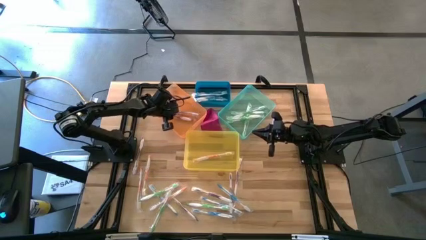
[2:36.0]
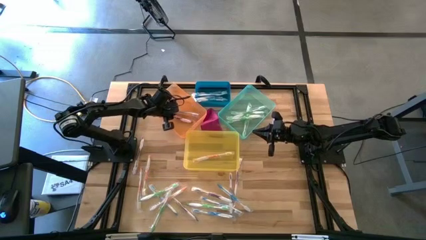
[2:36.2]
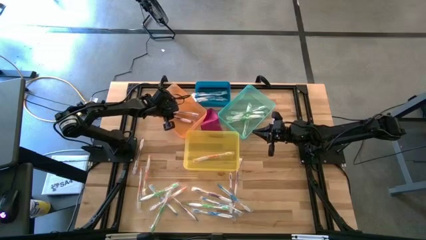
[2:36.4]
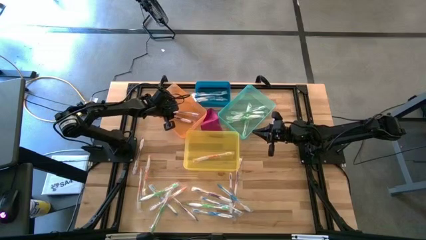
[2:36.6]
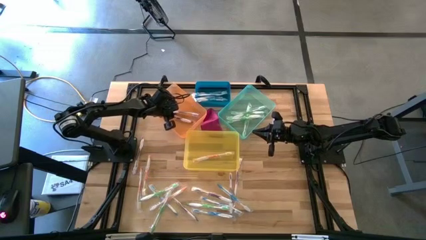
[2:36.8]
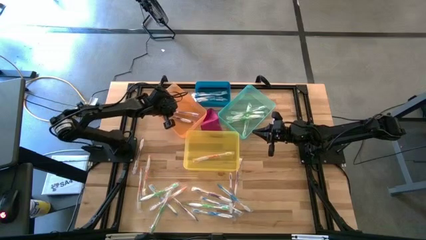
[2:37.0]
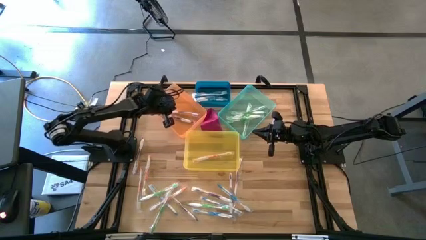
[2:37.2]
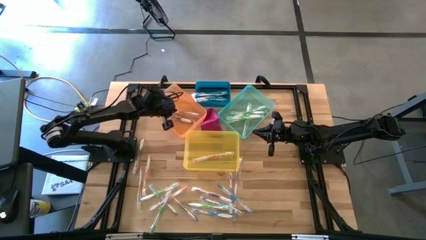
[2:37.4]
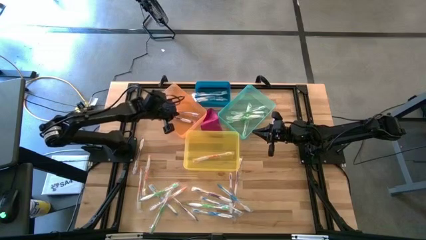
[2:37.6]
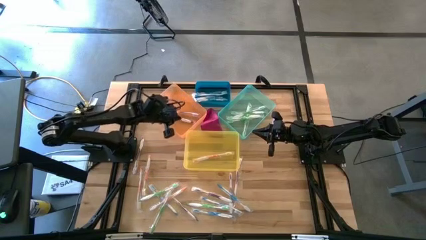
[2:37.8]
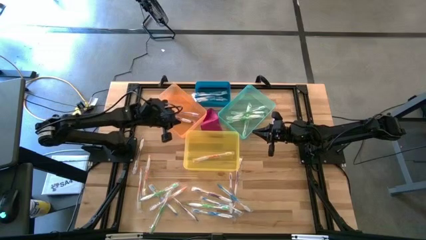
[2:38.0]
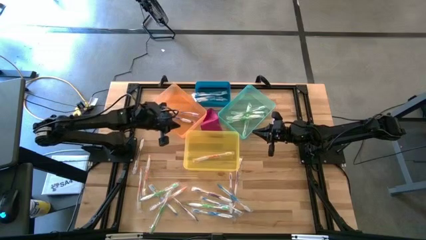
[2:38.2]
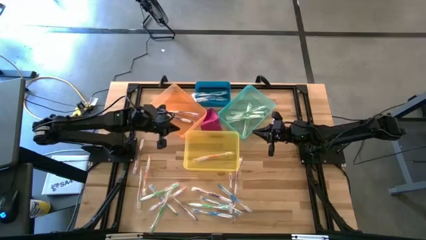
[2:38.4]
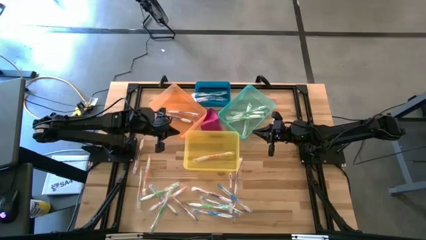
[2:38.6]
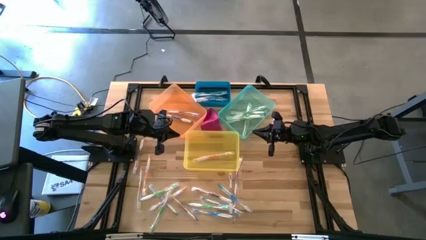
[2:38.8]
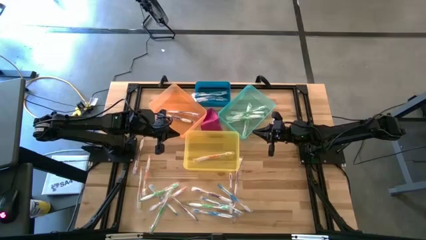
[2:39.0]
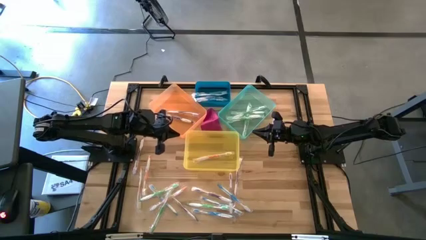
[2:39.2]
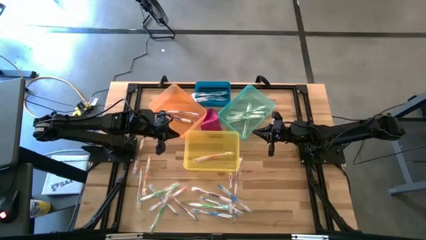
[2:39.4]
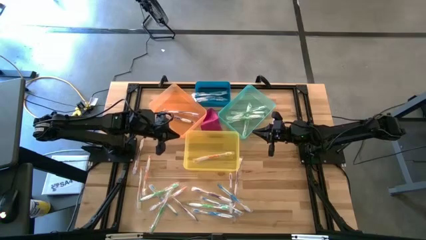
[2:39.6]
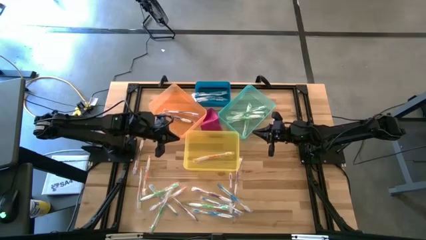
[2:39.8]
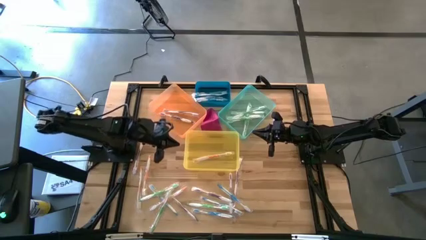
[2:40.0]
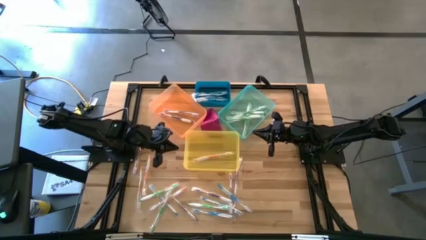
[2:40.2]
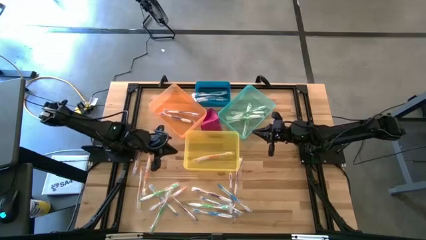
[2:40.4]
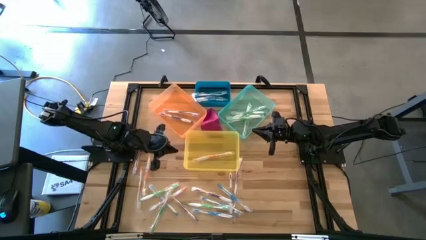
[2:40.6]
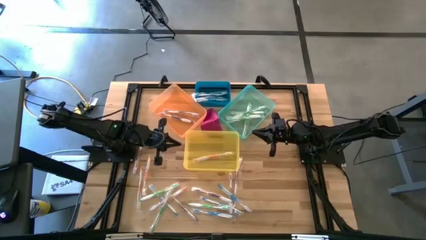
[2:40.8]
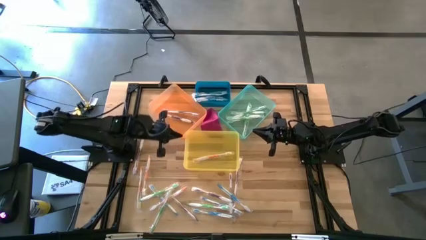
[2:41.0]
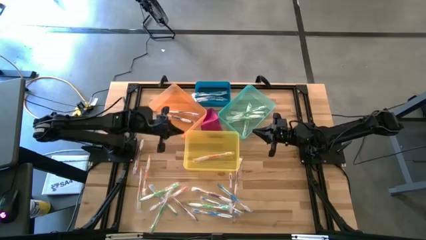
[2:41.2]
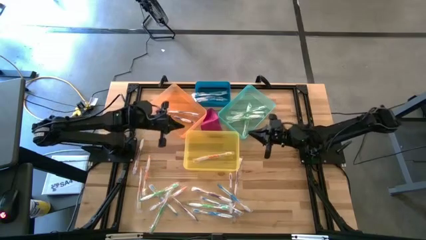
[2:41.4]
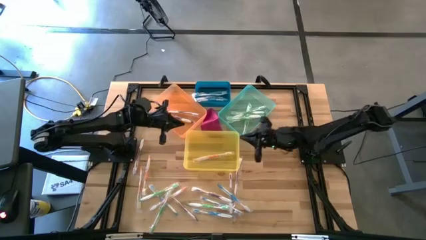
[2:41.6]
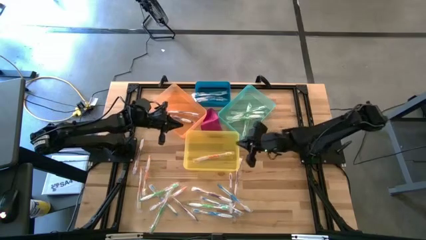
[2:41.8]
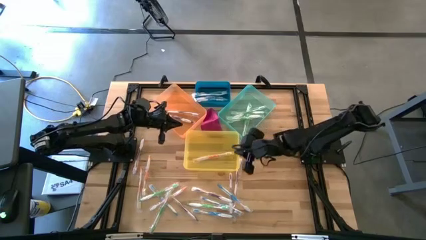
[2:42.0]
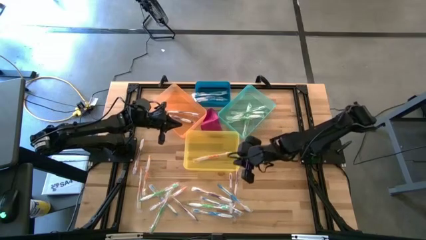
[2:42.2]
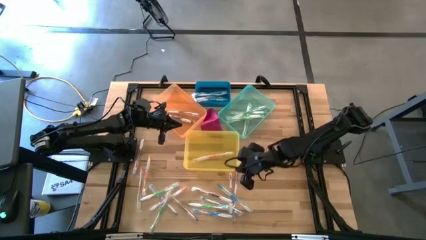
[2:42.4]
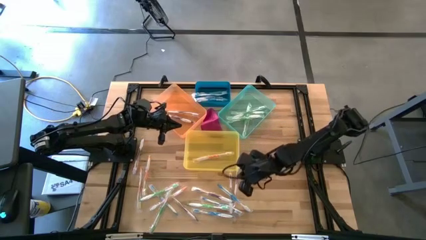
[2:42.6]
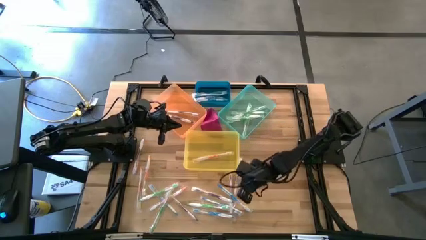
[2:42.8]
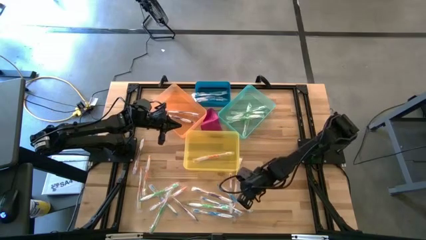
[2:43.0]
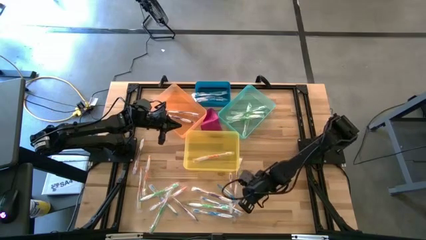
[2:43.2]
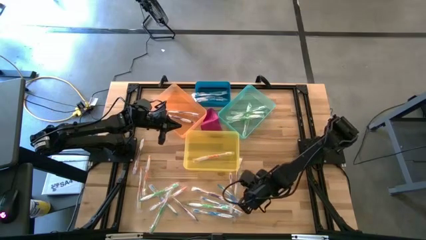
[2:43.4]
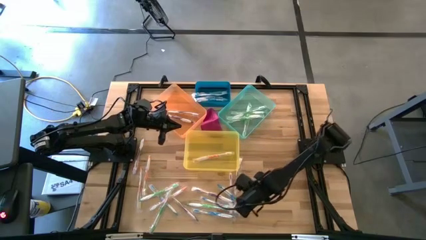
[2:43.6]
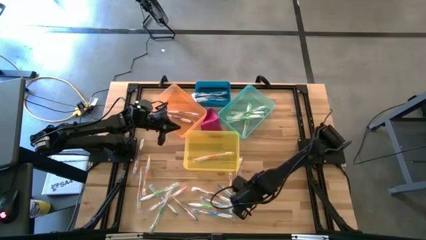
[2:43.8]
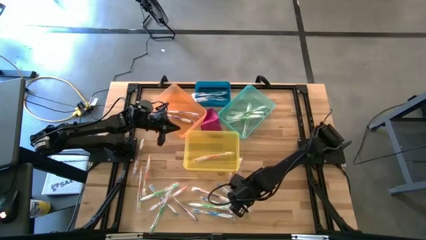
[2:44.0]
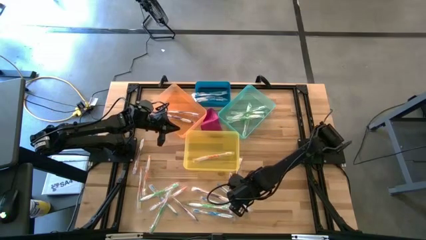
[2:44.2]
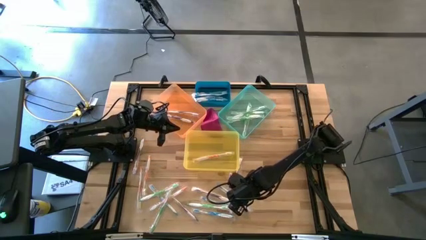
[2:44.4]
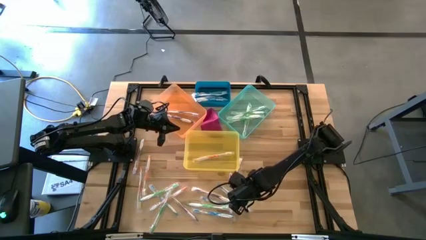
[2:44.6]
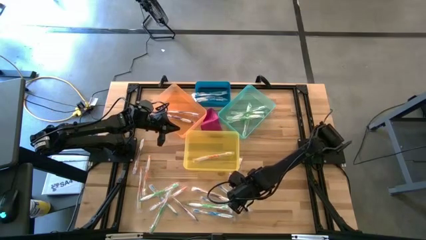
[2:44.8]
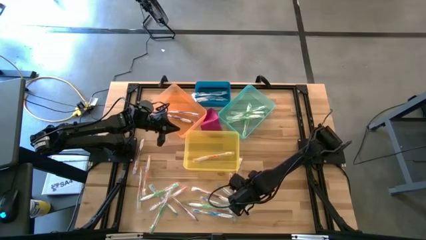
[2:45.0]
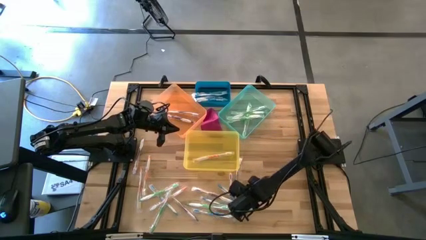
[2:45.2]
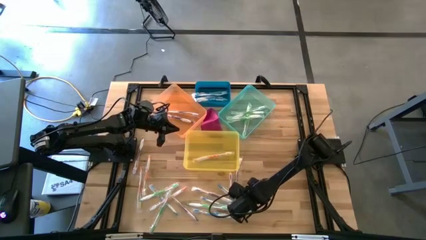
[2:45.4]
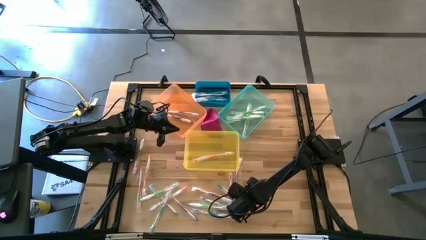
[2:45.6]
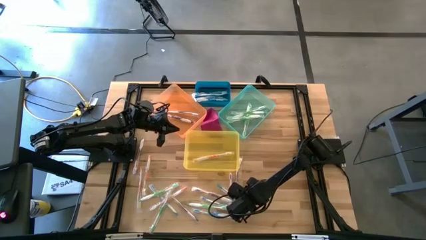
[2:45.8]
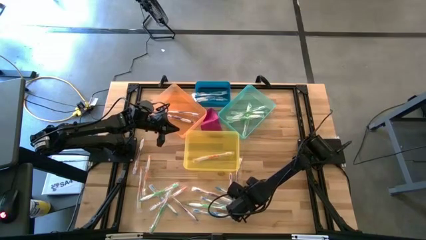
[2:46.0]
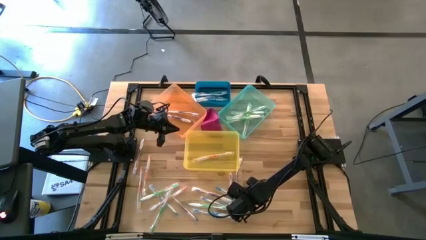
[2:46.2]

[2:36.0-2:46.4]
Task: Pick & Place Toothbrushes
Put the blue toothbrush into the blue bin

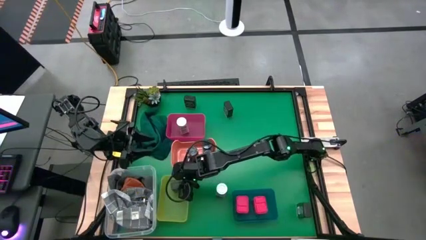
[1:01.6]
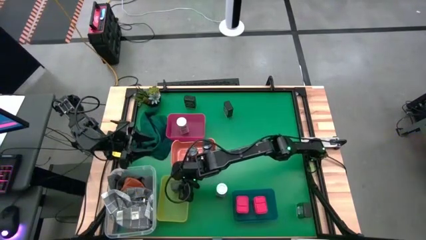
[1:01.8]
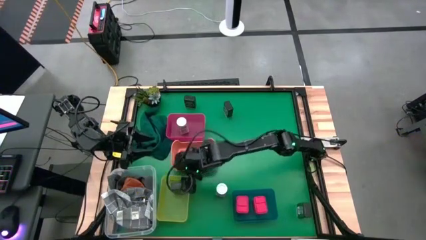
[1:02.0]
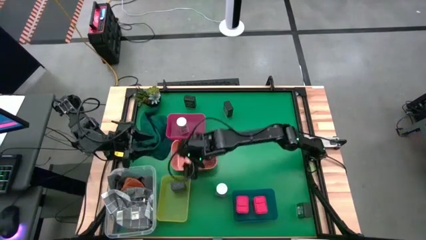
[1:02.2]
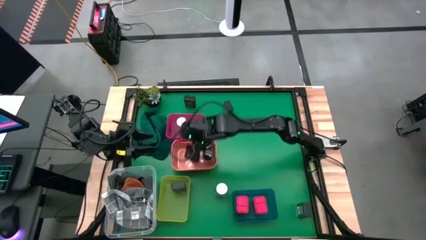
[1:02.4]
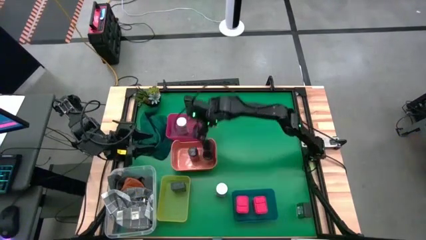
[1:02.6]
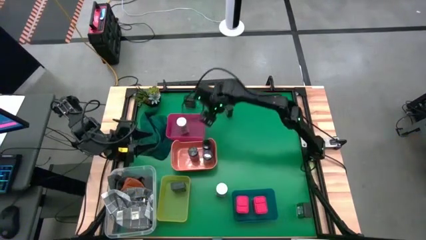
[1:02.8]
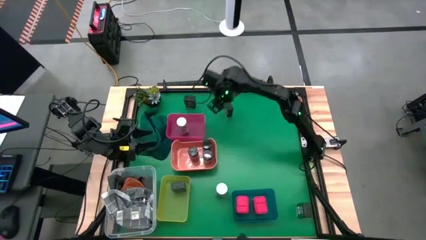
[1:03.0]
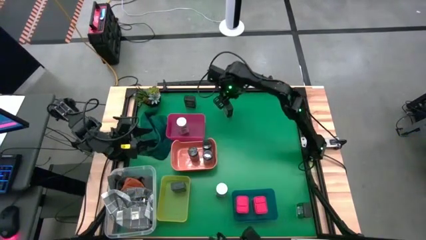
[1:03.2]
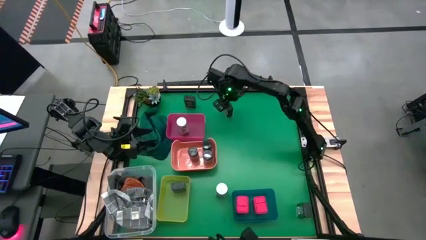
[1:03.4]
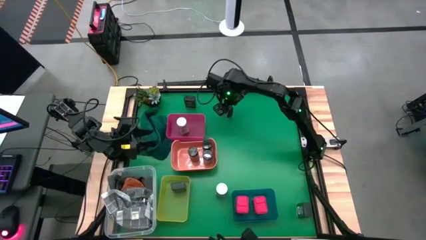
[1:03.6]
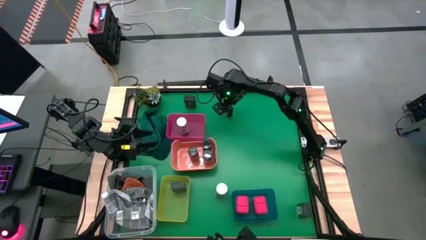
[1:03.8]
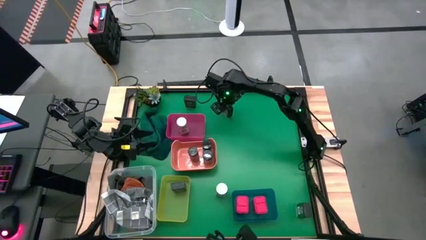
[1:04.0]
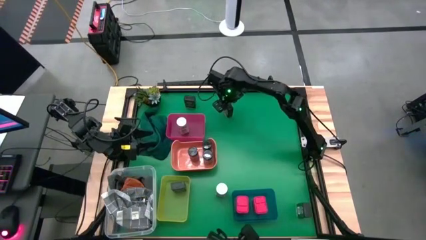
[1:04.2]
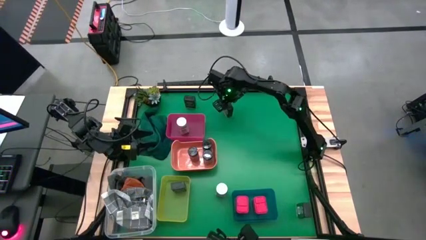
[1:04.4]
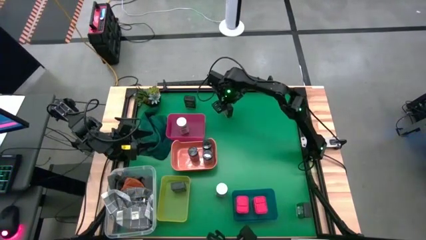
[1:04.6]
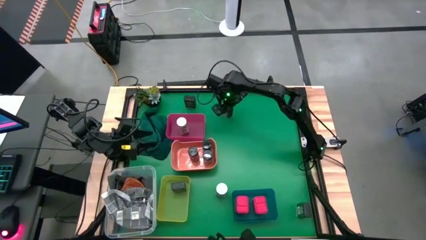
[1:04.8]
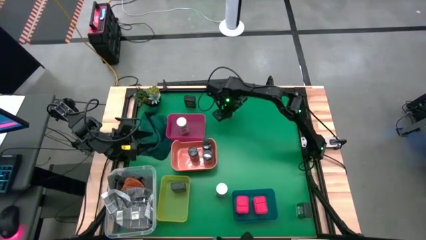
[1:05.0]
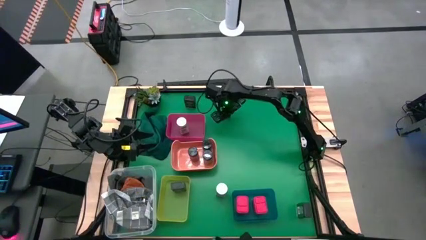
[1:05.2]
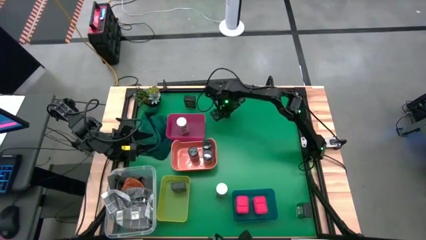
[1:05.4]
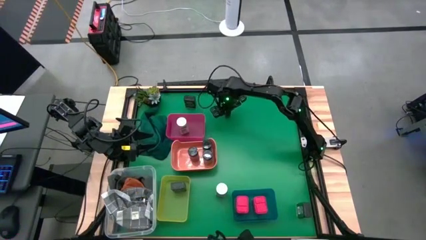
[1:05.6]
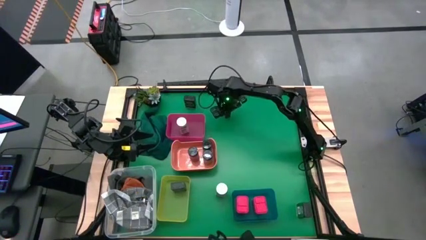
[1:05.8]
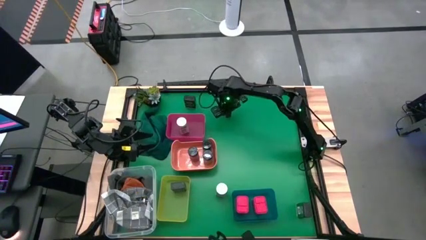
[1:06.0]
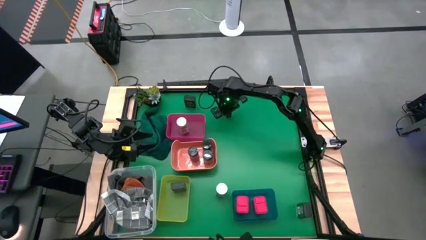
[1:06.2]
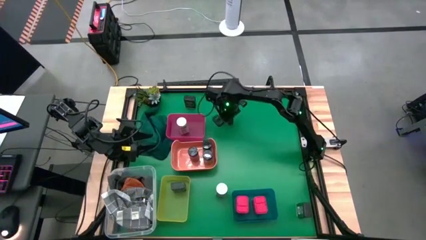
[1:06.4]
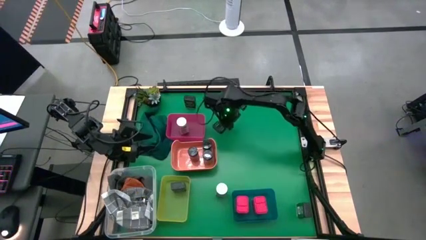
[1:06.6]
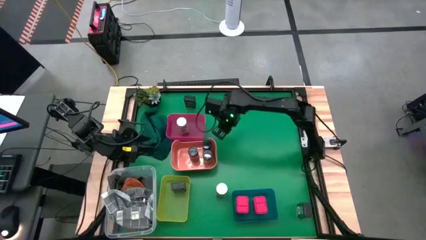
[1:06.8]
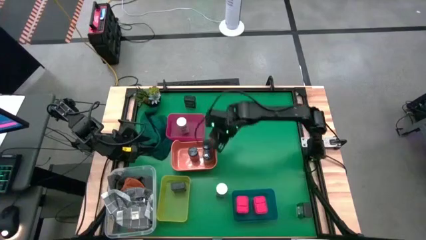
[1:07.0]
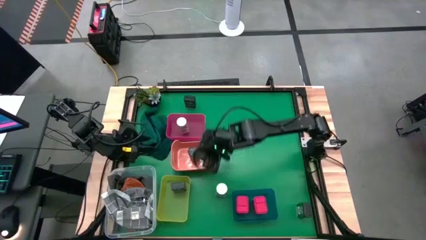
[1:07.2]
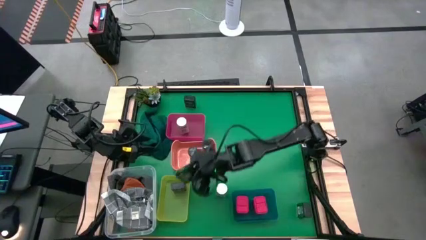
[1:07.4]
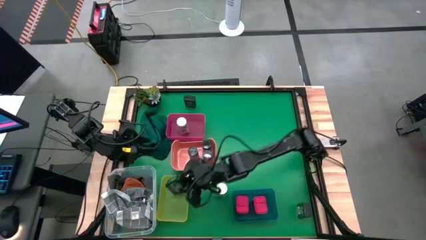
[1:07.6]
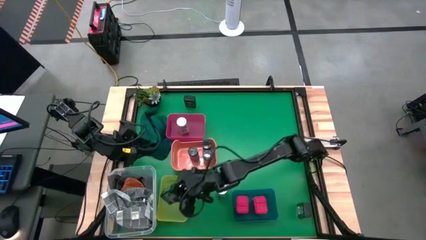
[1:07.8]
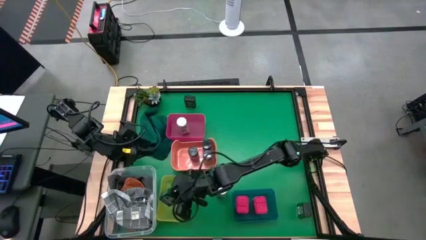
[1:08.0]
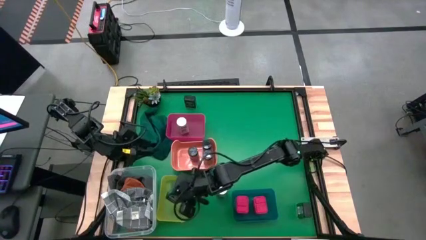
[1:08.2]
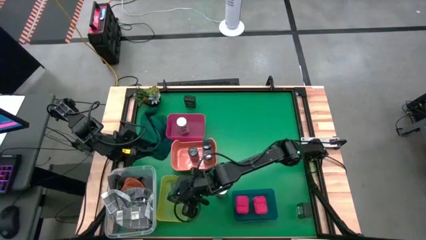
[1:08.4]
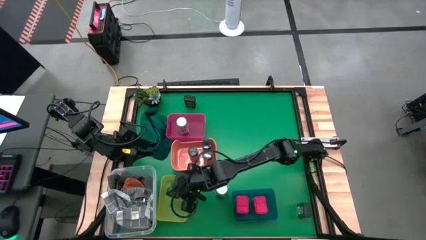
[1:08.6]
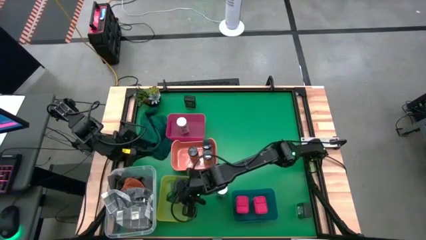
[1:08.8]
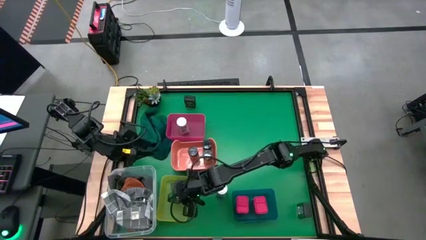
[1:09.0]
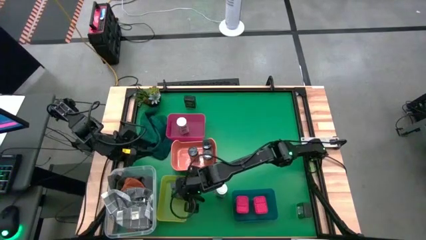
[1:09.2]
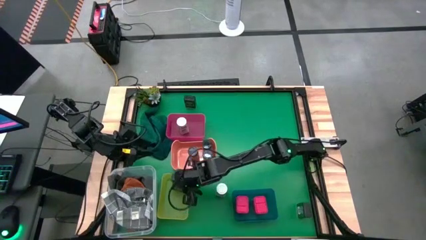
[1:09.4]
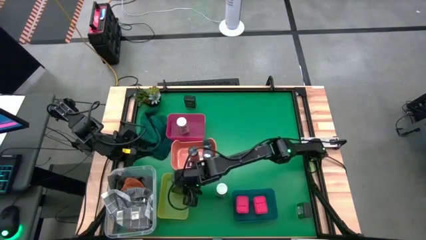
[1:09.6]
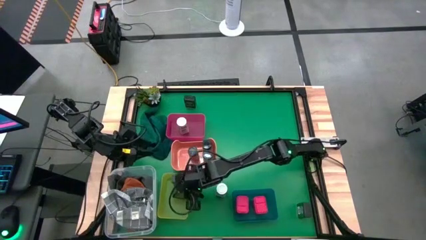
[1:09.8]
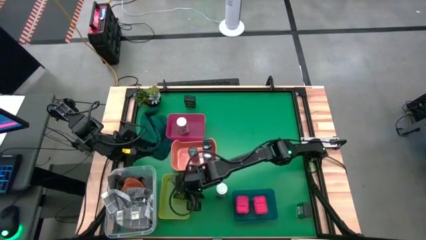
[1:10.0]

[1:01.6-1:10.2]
Task: Sort spices by type
Put the top right green seasoning can into the yellow bin
